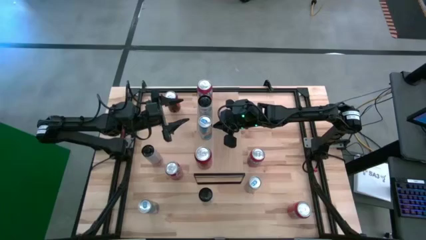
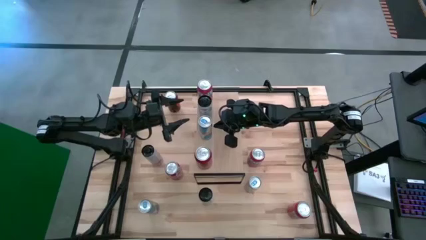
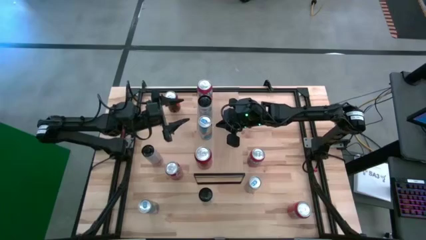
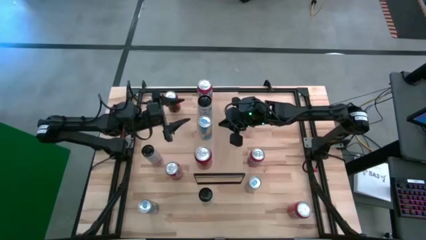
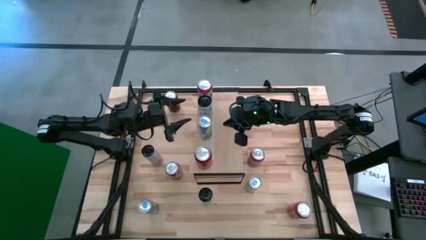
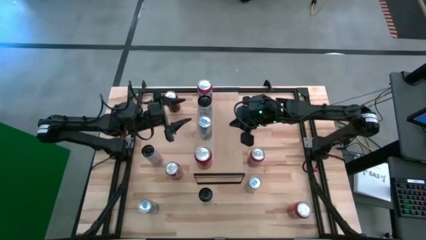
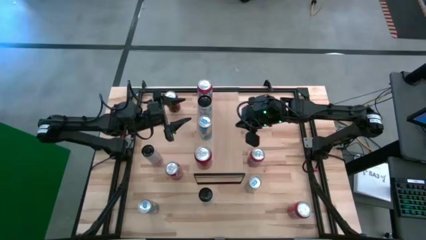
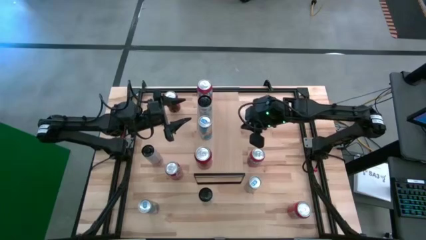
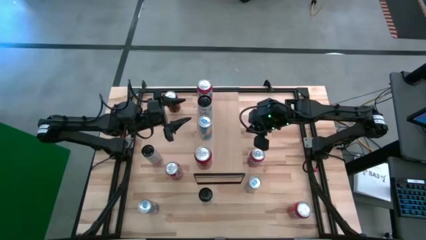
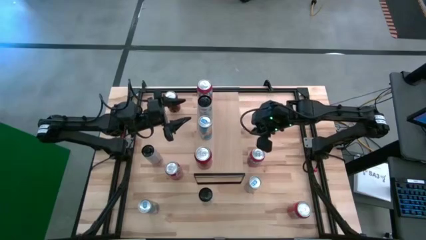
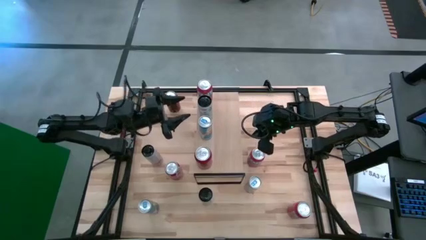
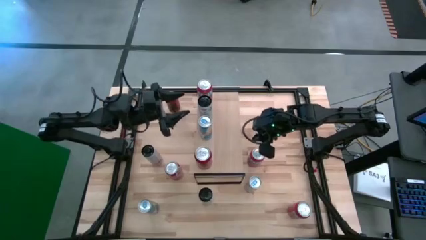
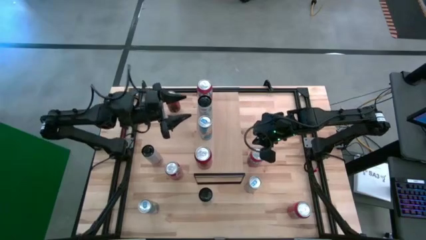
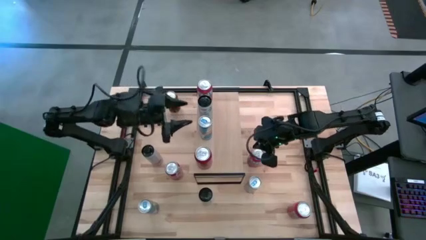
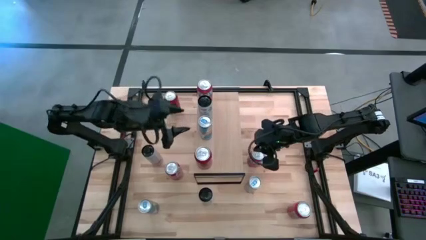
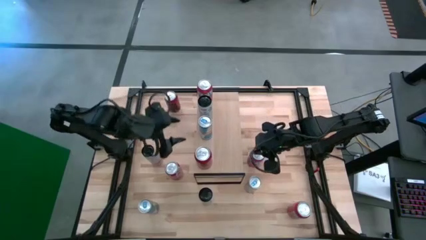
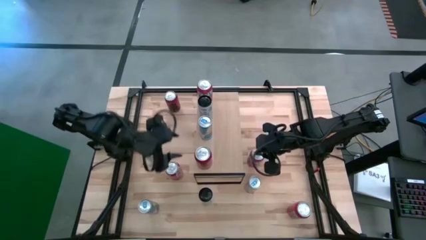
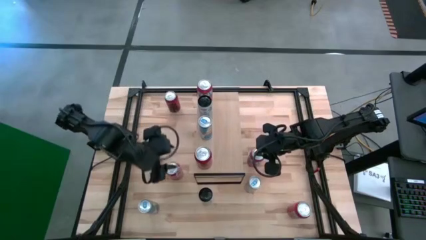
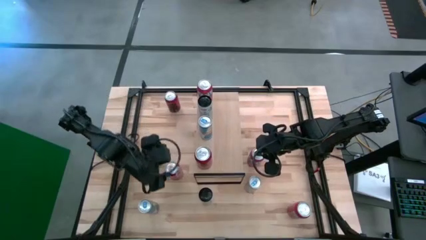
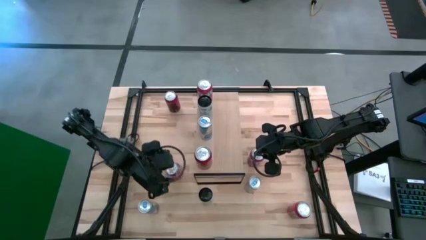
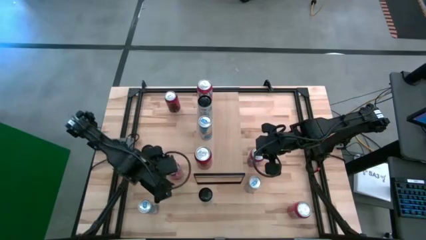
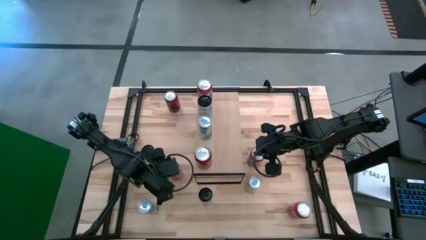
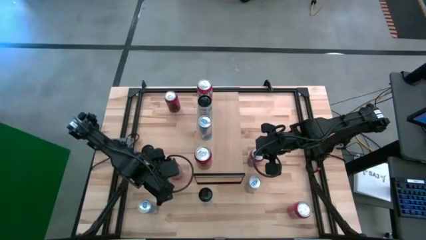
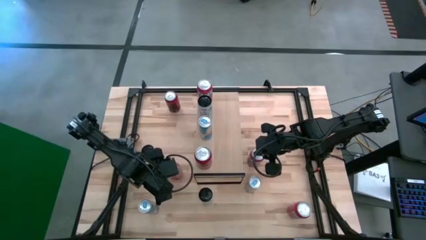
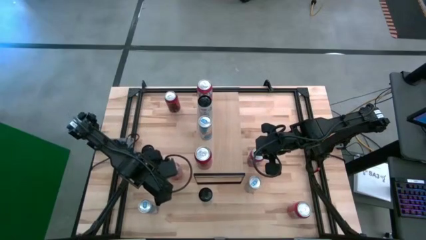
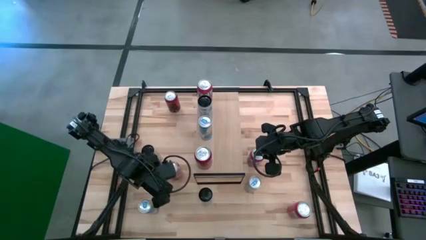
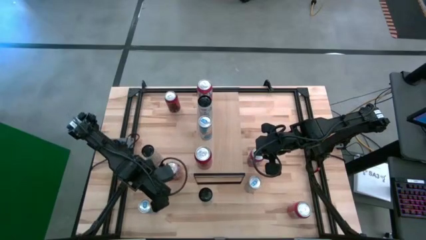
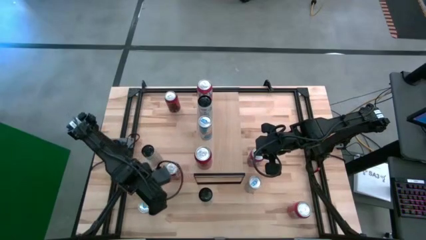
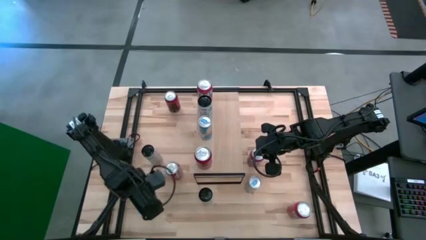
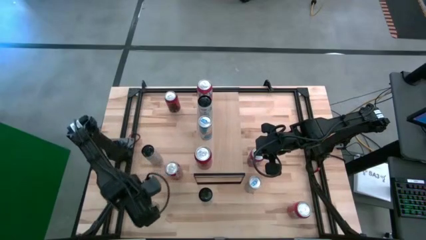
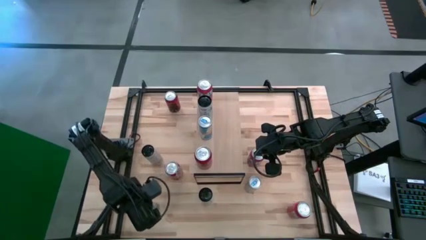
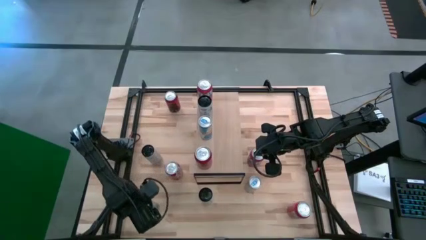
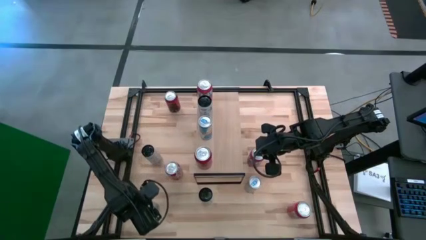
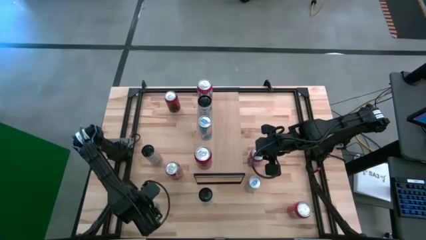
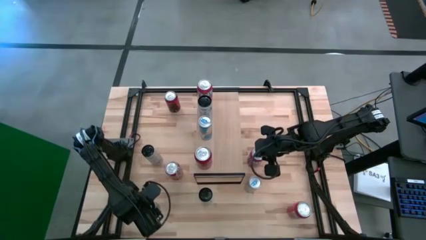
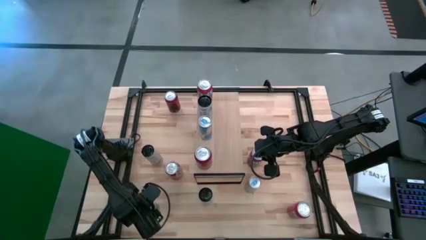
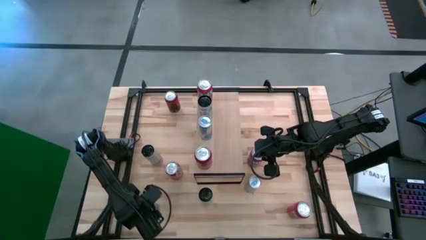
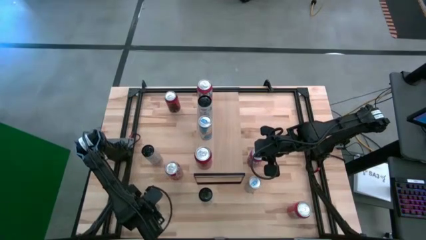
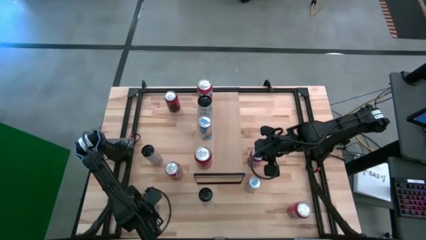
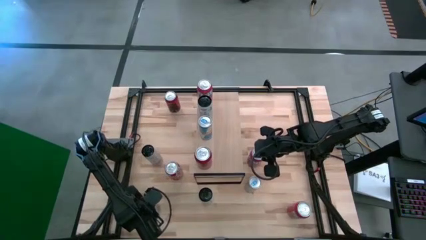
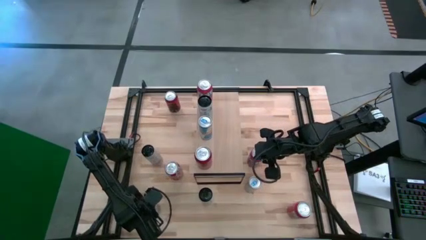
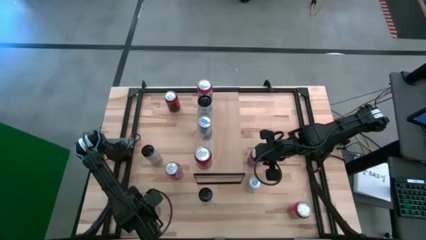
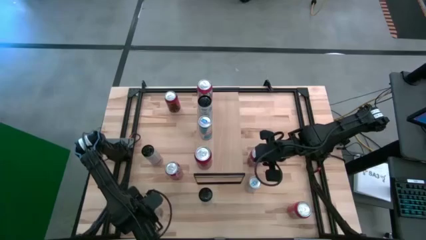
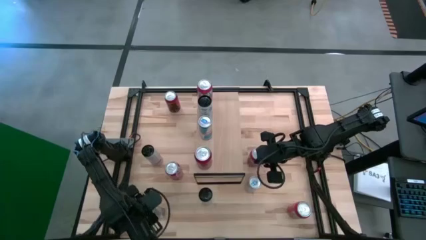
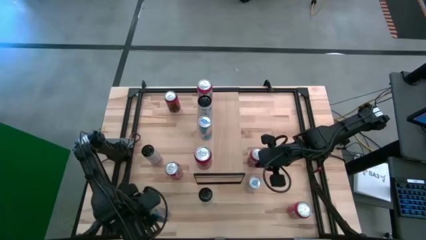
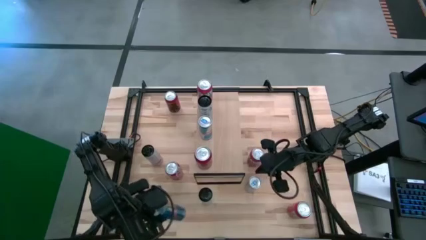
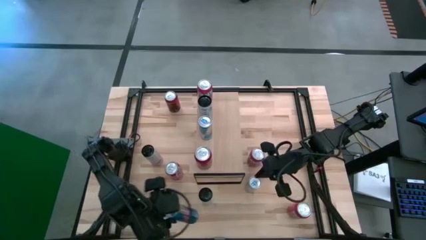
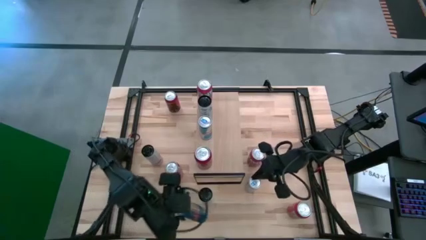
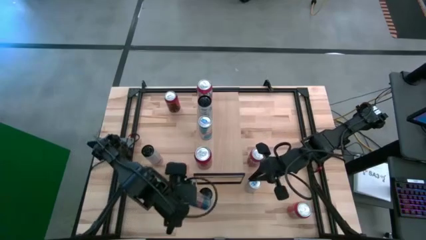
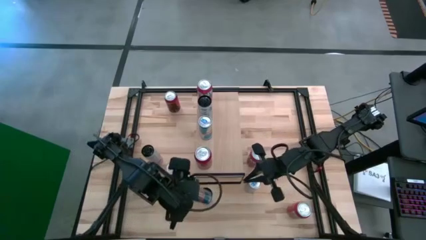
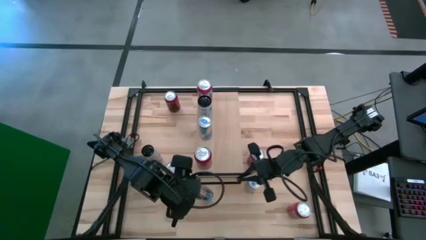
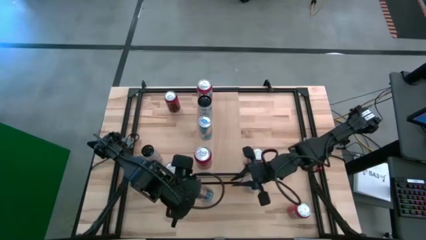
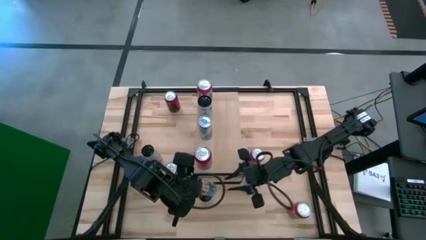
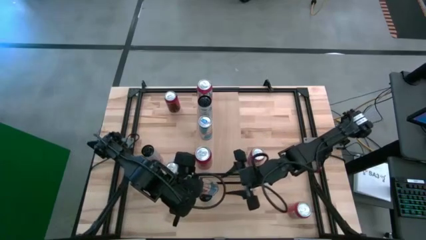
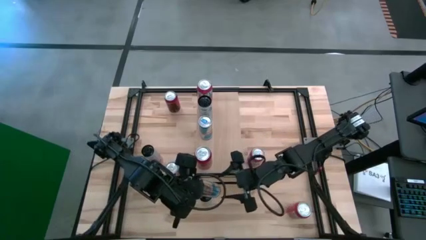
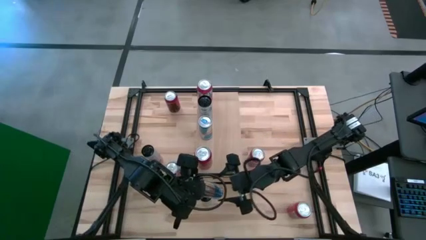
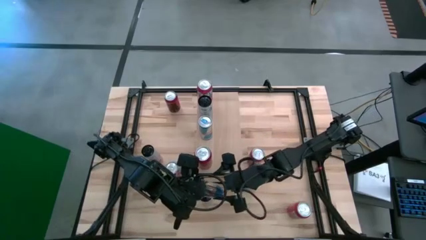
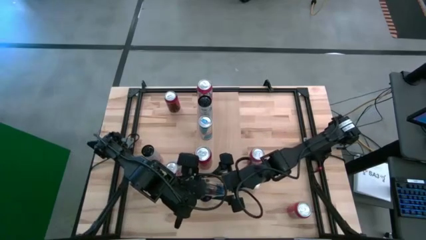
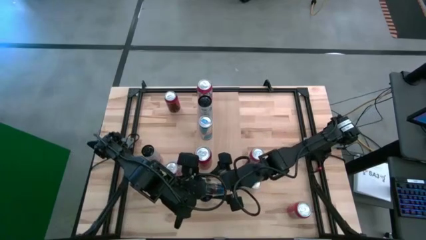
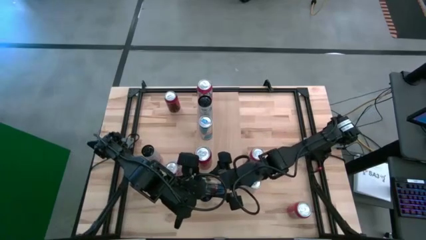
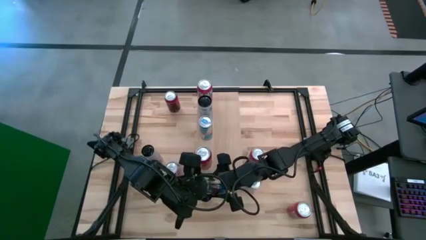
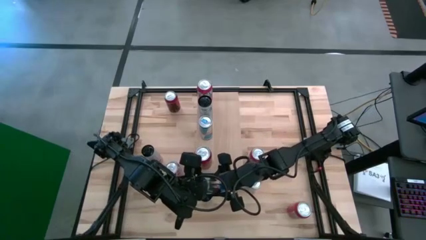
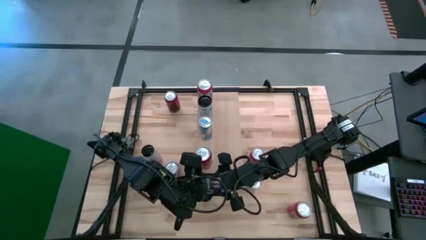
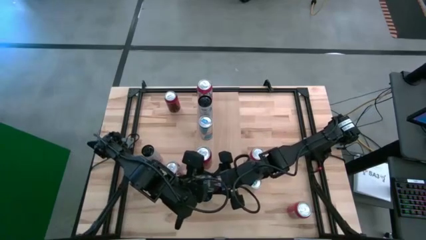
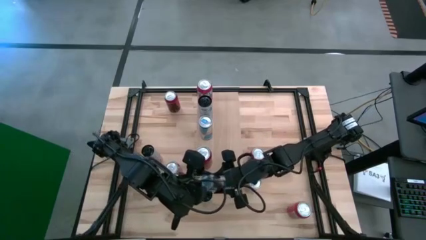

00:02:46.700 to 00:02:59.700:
Task: Place canned beverage on shelf
Put the left blue soda can on the shelf aligned with the other blue soda can
